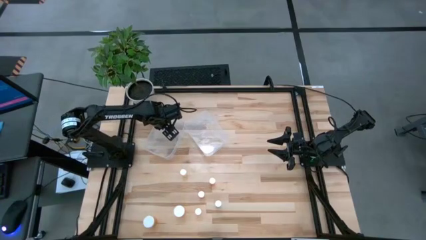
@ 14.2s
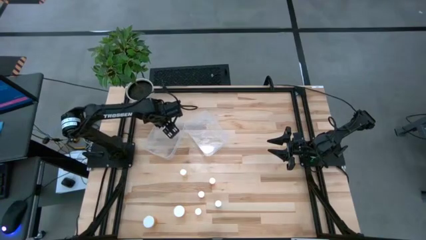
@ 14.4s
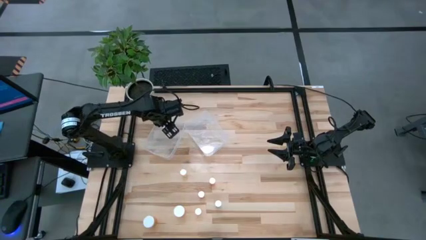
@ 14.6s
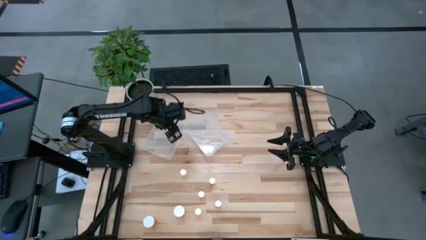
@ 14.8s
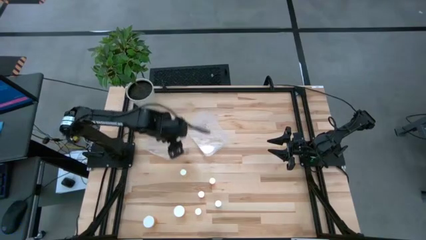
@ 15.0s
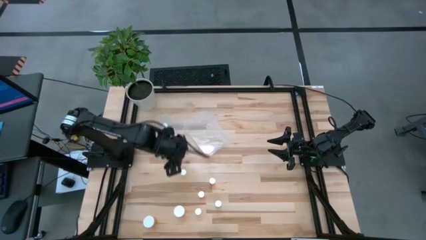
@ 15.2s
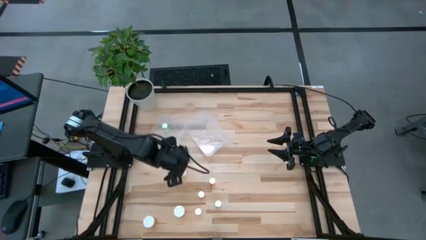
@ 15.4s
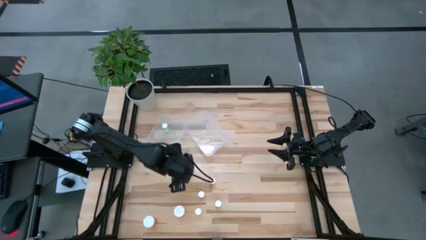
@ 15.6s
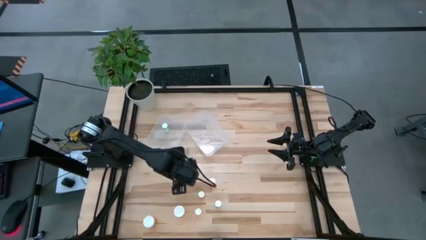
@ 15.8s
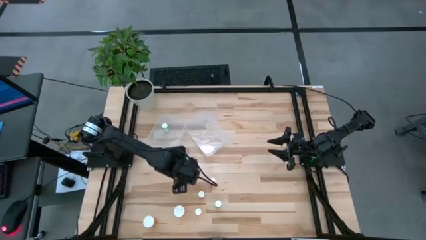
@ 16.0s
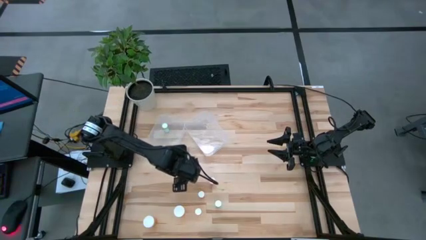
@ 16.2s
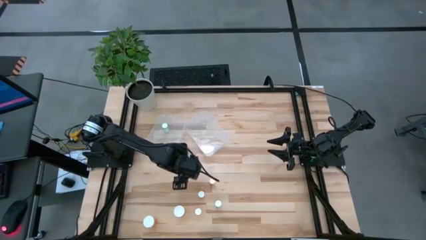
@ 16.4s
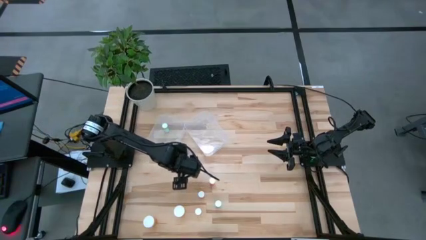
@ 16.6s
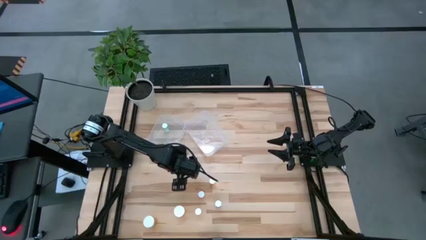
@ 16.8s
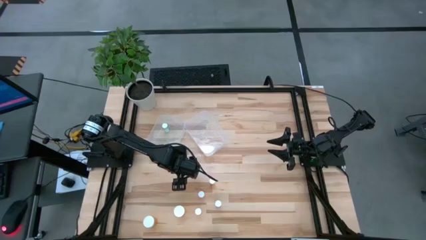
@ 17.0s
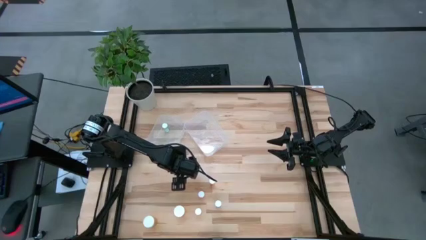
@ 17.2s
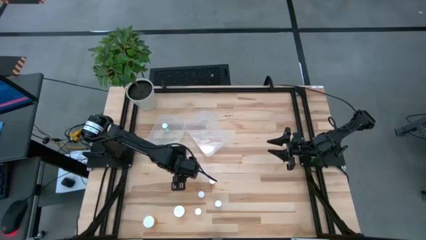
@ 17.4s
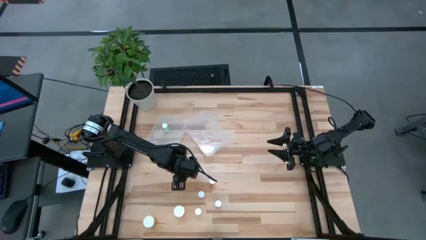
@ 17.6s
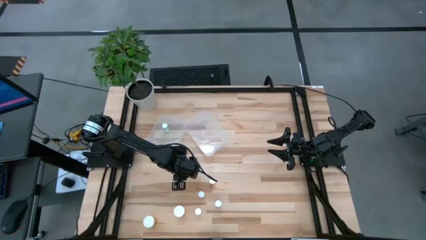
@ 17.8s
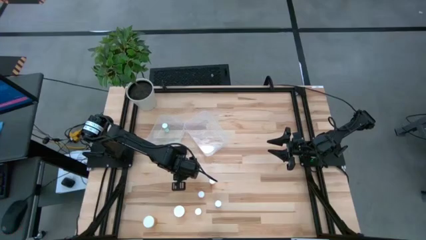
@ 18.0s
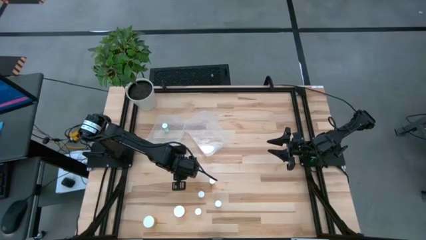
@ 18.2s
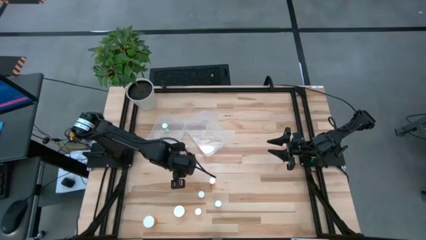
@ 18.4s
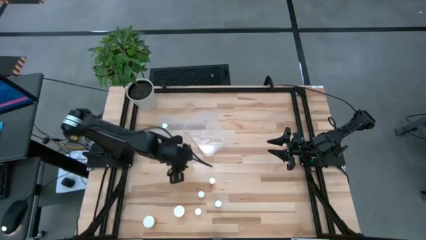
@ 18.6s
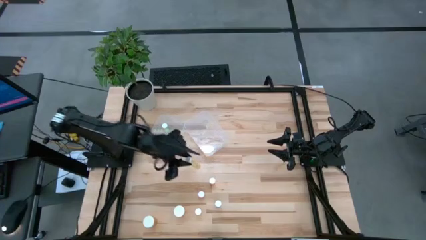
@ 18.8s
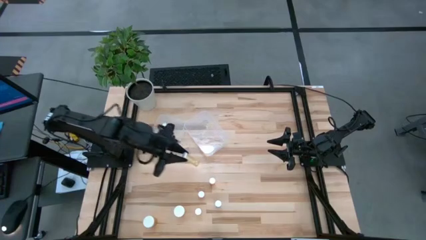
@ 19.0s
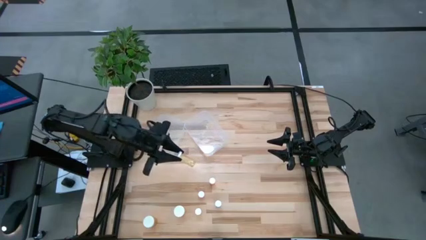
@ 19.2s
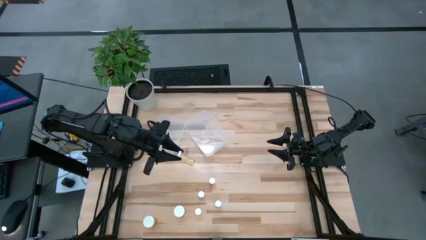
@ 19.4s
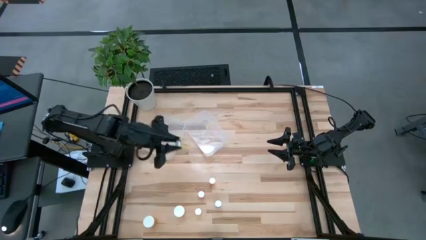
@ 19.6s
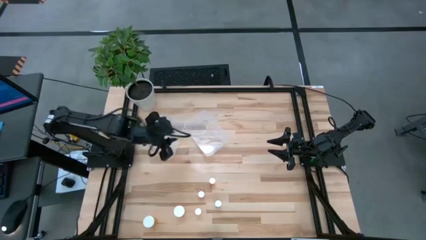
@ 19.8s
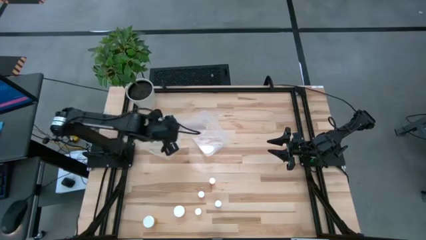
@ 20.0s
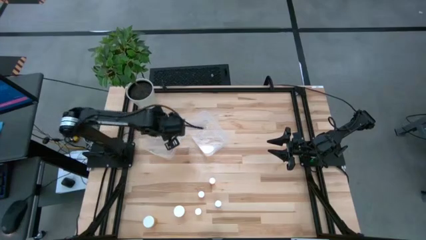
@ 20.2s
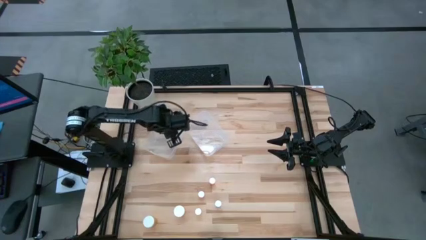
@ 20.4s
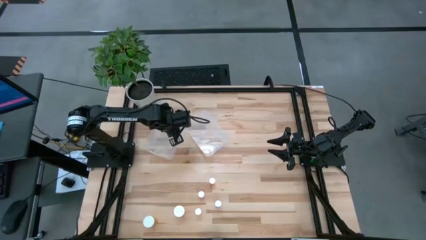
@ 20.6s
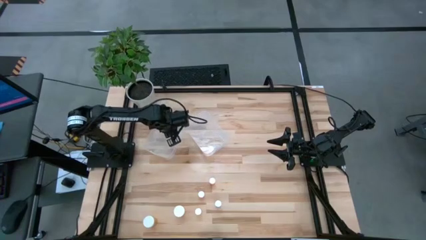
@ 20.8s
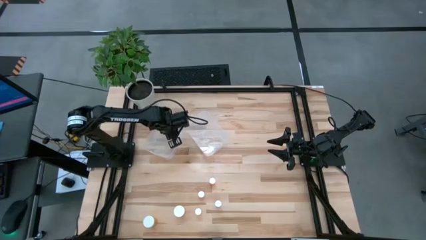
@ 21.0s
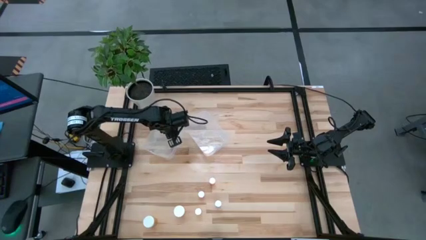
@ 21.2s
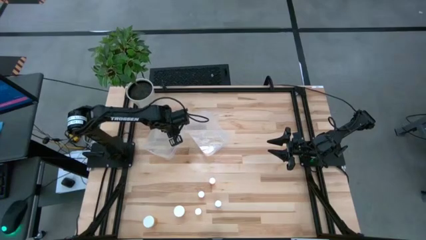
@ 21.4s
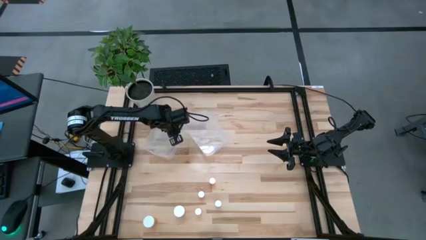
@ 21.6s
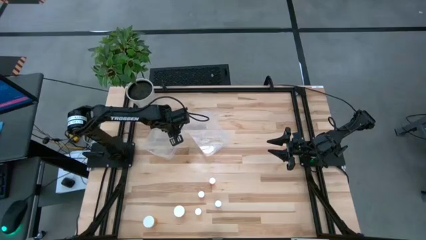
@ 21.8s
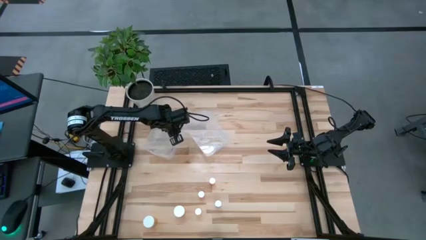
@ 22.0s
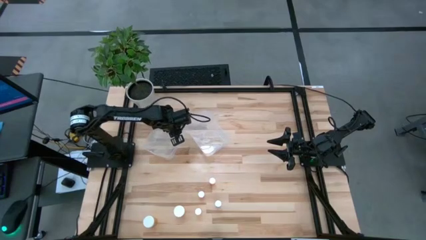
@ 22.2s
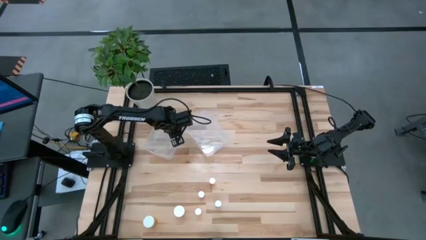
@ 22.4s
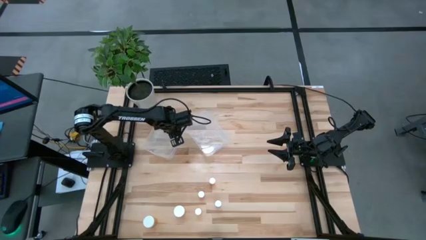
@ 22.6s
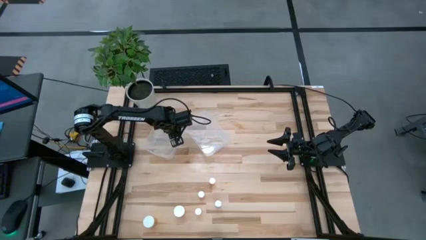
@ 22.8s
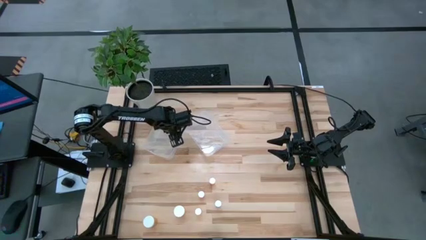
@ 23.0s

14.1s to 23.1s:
Task: Pick and place medicine bottles into bin by pill shape (circle, oval)
Put the yellow tablet bottle into the left transparent bin

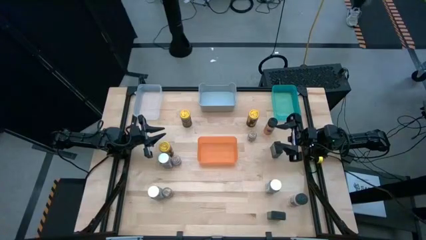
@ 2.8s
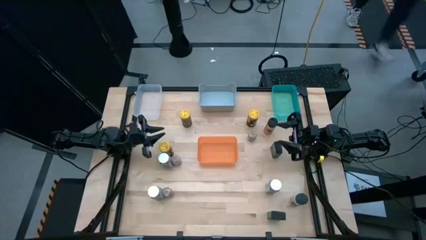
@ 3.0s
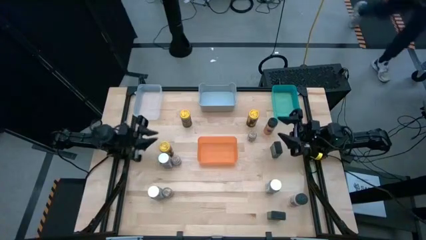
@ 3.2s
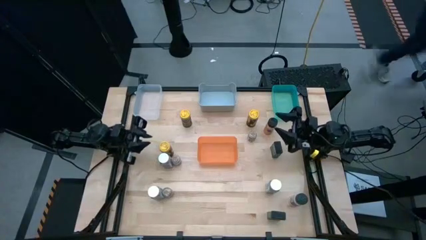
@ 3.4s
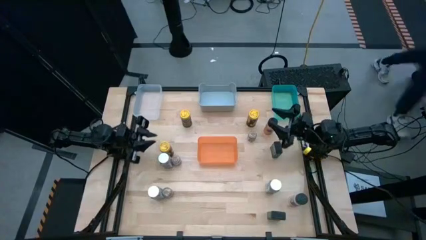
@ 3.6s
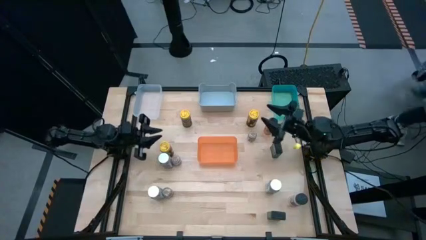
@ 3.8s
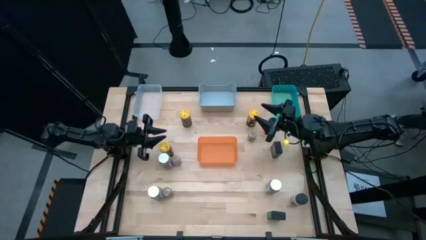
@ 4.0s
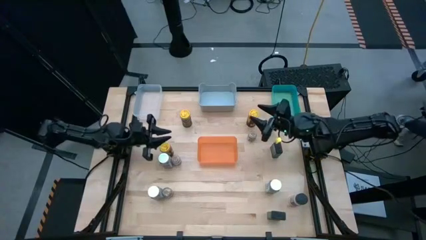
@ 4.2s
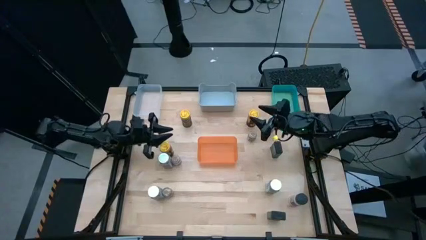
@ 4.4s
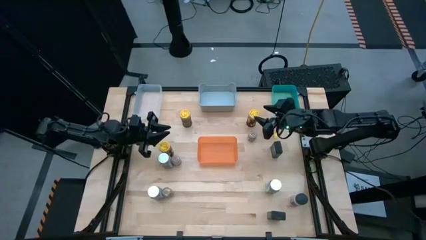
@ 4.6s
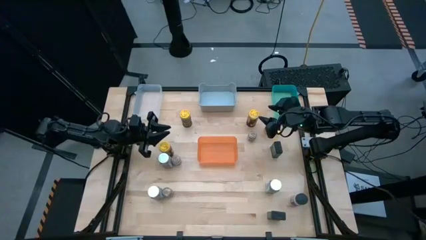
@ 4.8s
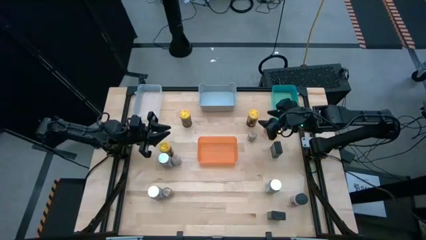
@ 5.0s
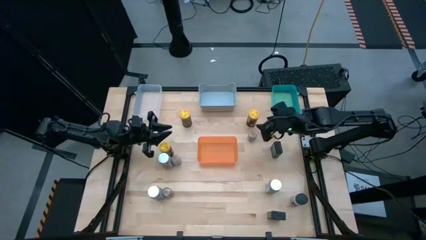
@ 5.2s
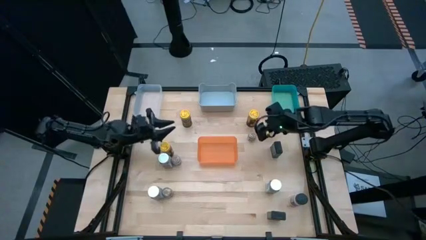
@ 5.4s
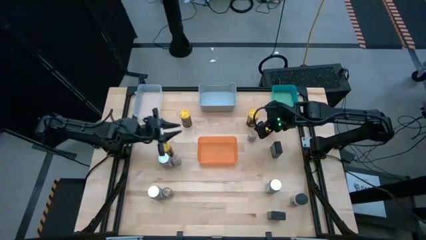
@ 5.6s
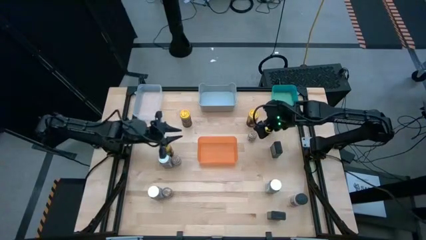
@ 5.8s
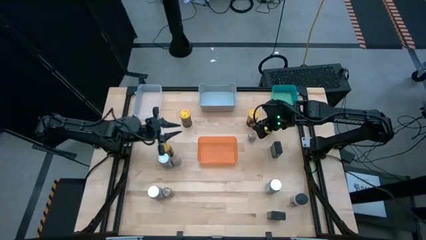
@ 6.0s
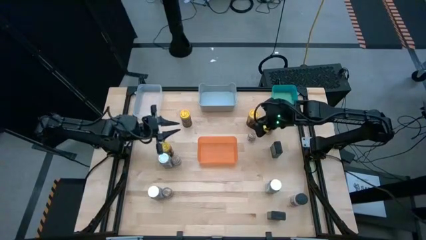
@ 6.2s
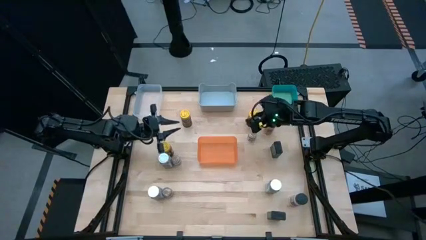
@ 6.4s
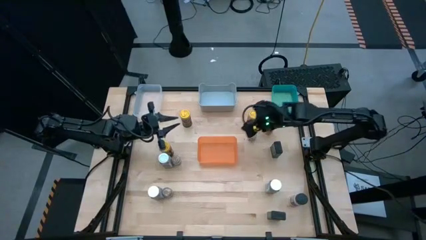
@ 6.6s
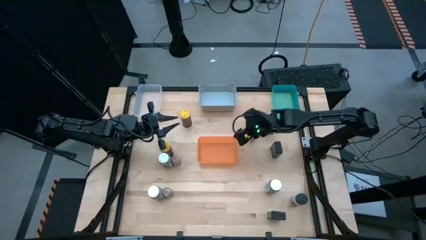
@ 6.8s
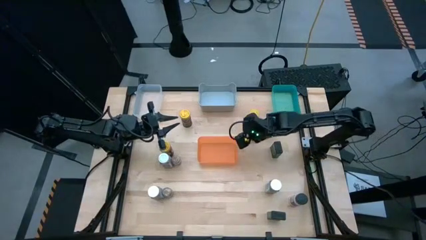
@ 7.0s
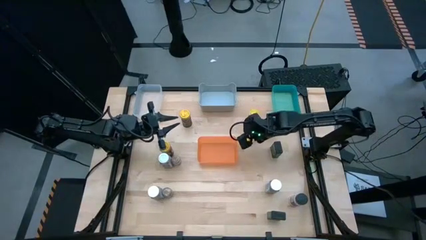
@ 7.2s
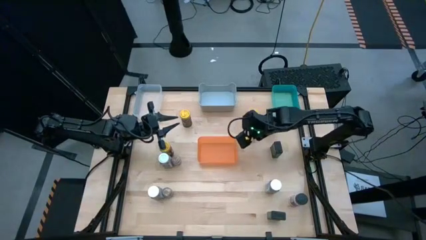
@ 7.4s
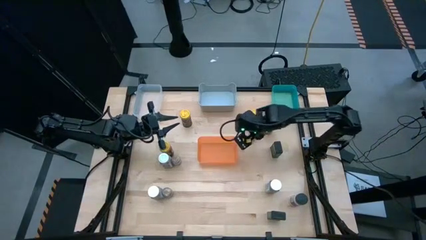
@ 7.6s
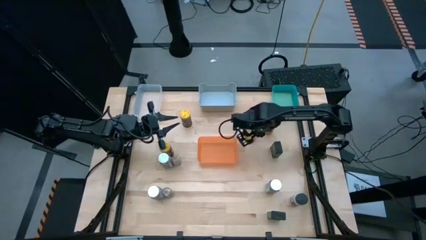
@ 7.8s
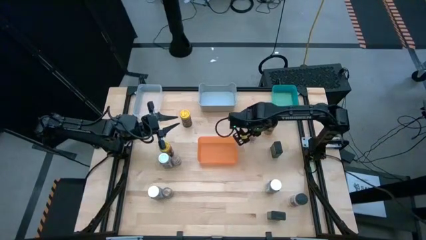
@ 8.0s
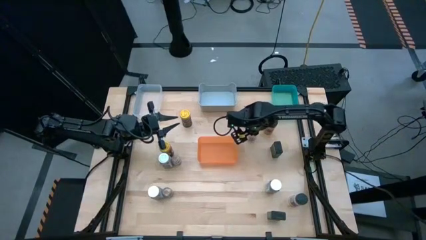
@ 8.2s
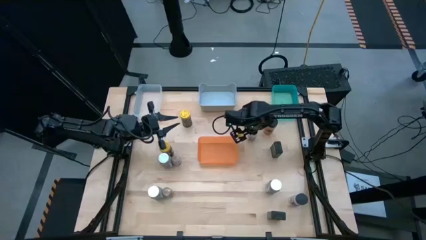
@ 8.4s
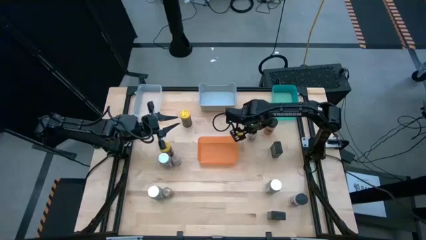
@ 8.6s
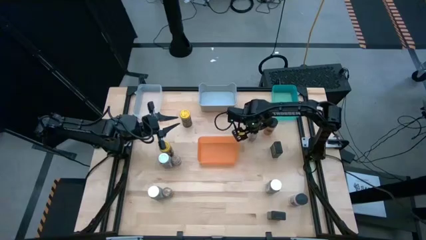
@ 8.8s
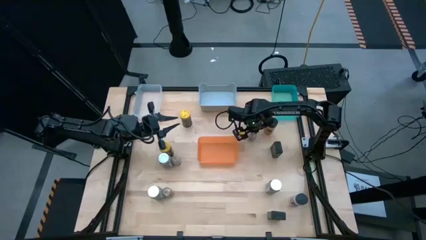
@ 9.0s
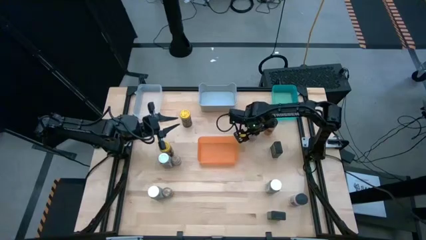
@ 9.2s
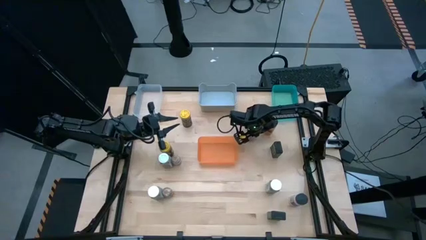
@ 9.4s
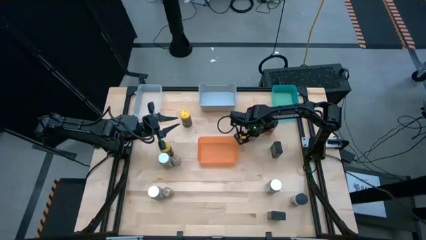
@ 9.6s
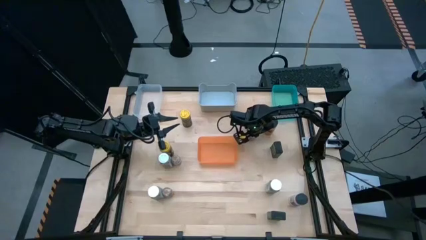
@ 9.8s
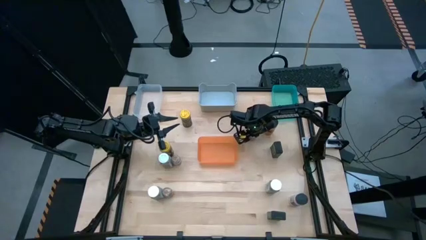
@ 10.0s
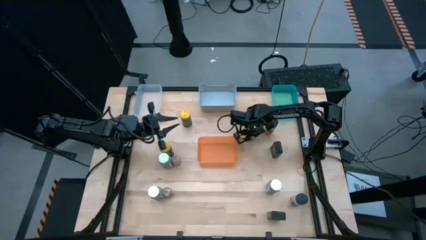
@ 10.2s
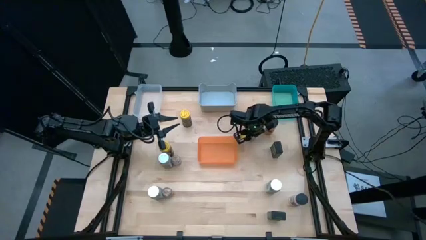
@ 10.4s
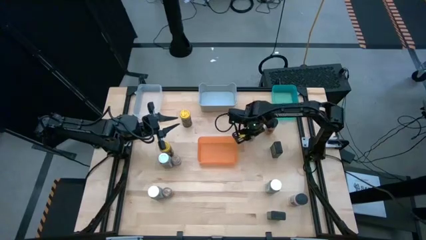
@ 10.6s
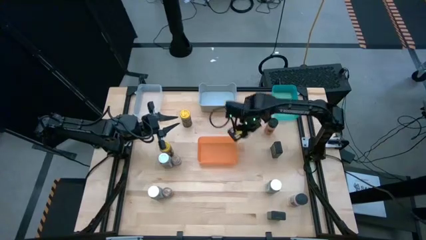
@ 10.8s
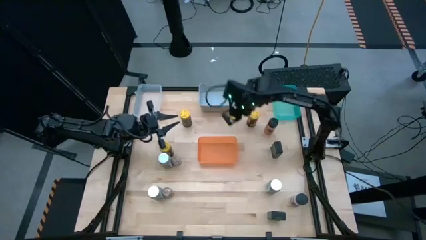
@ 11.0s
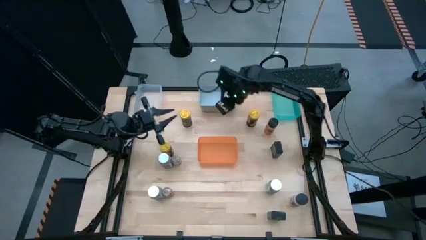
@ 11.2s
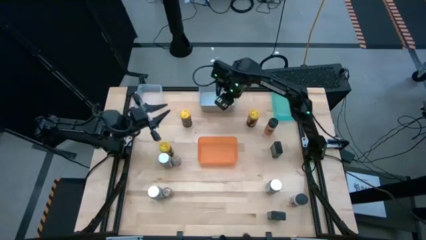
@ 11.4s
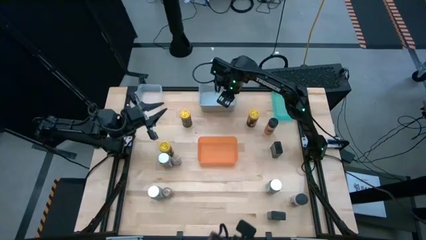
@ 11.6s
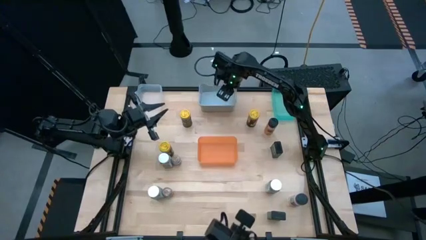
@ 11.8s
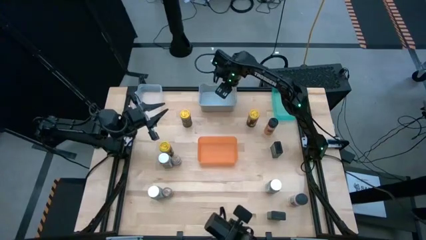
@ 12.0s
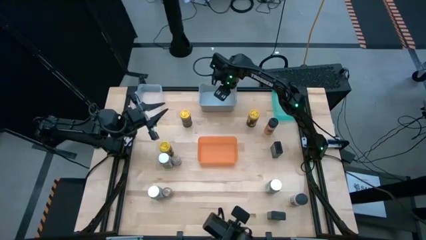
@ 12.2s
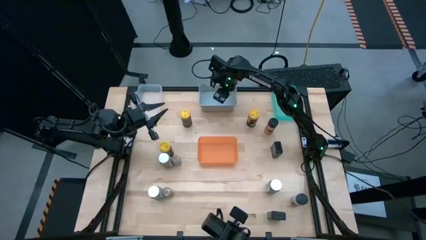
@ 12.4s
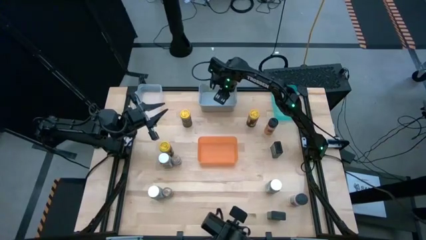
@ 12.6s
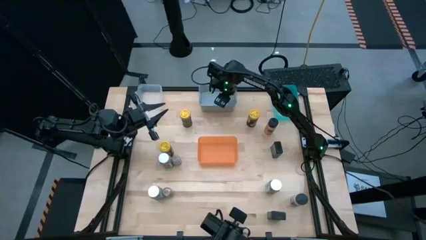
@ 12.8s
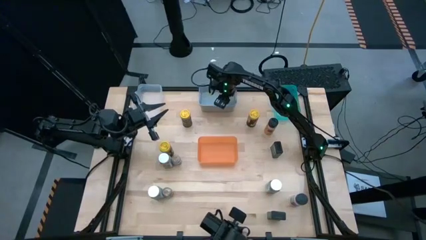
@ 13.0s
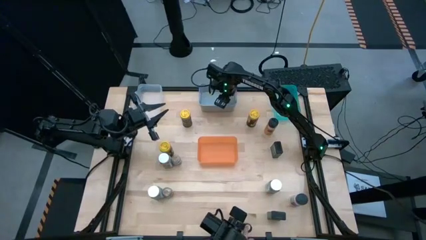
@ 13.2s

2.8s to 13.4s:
Task: Sort spices by type
Put the top right brown seasoning bottle into the gray bin
